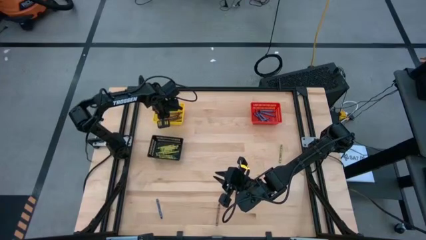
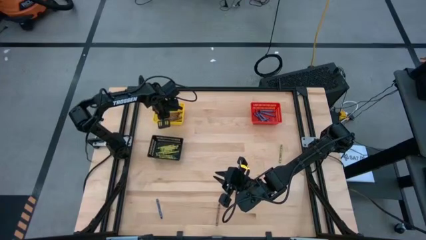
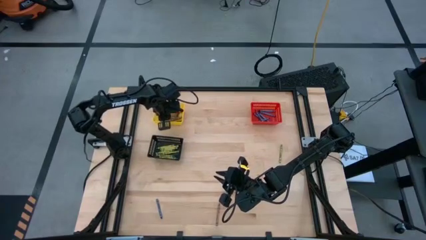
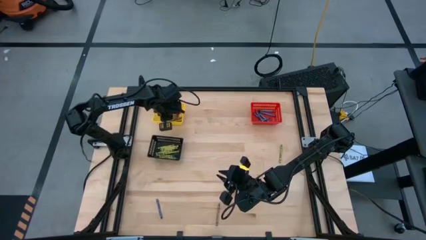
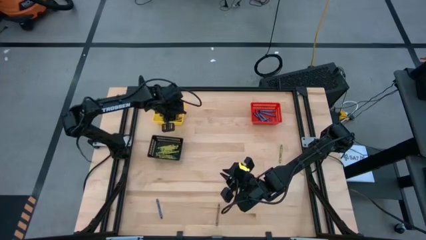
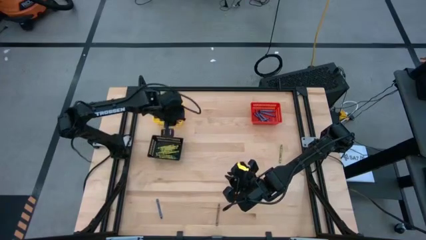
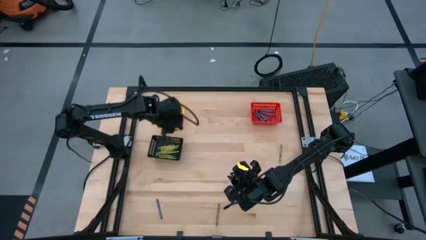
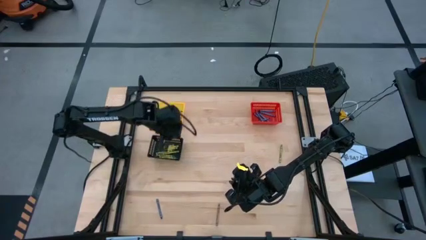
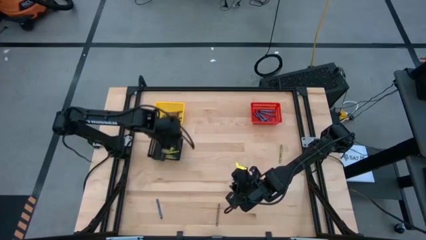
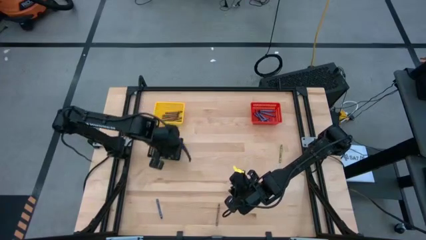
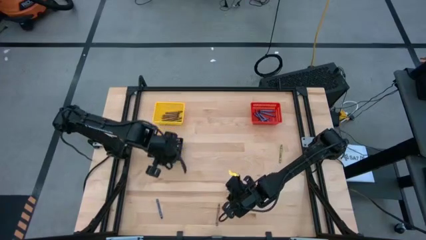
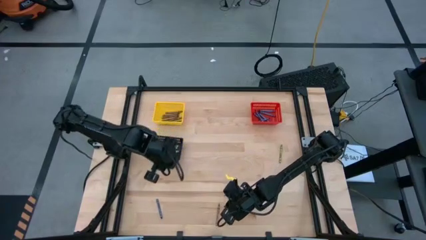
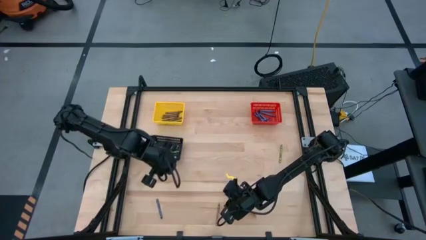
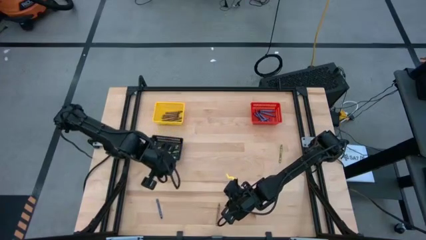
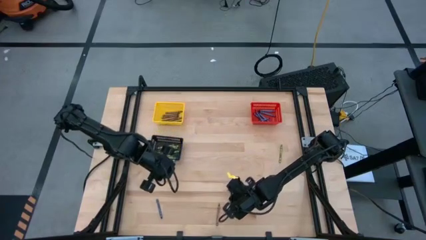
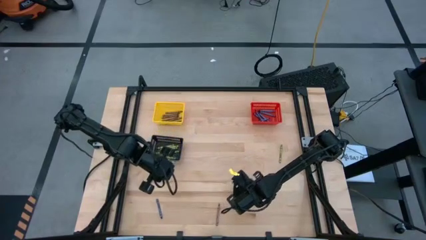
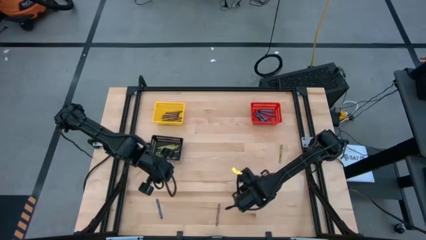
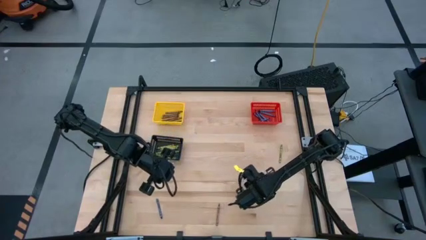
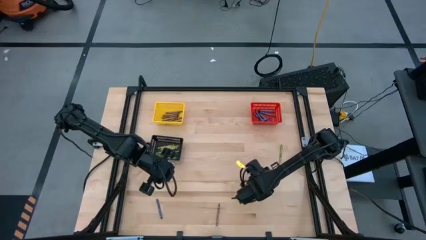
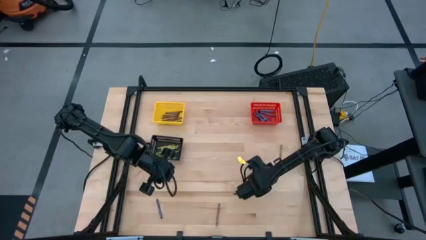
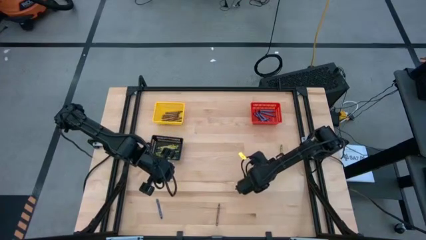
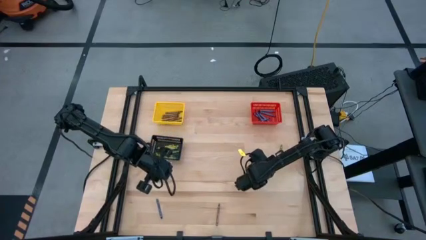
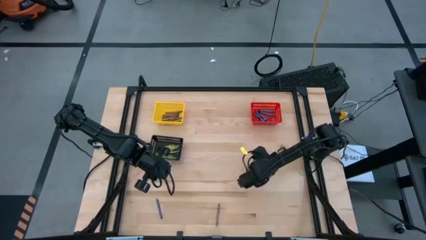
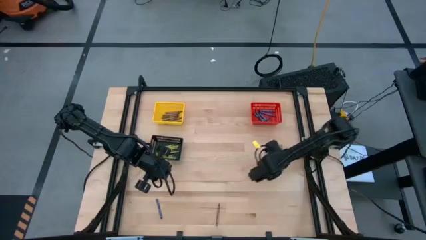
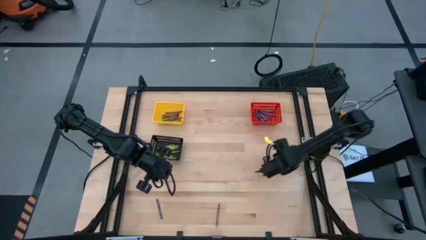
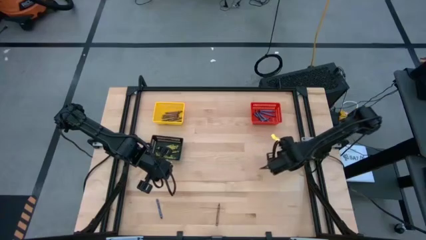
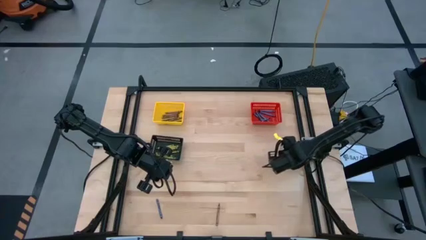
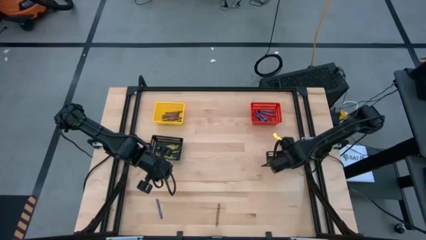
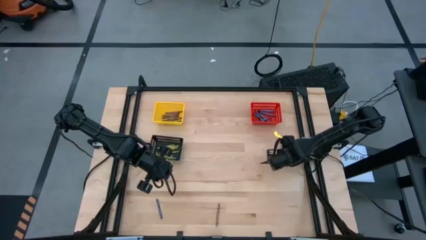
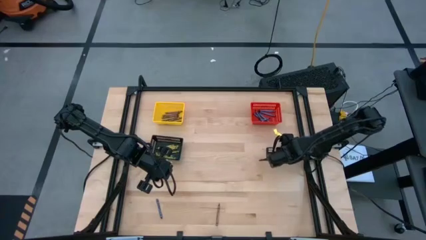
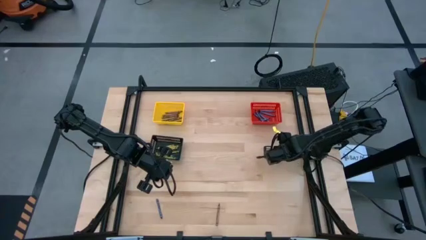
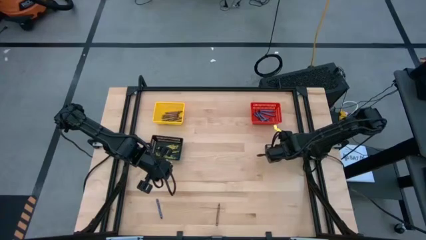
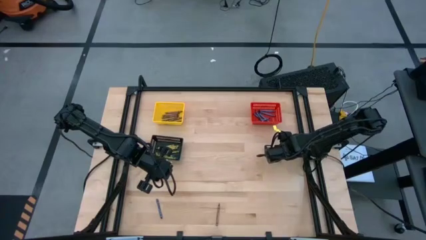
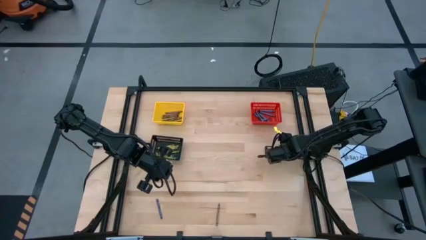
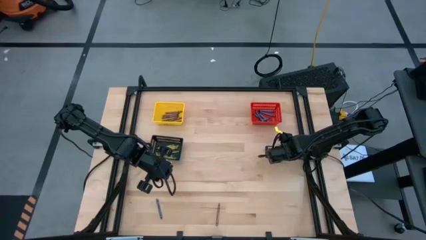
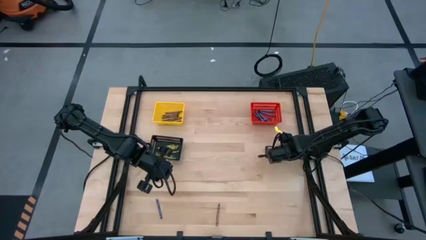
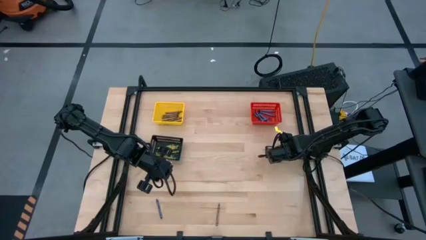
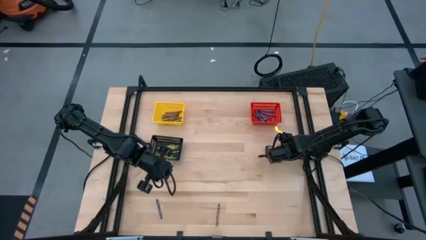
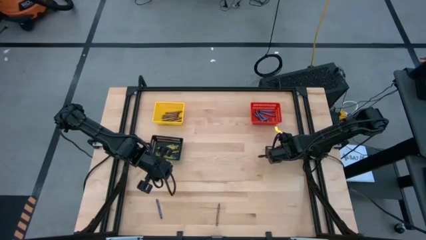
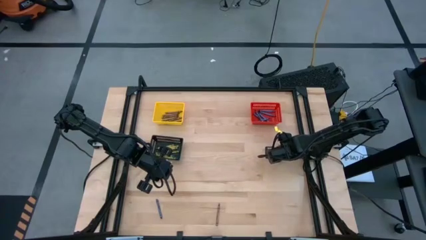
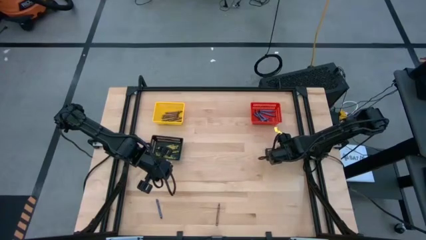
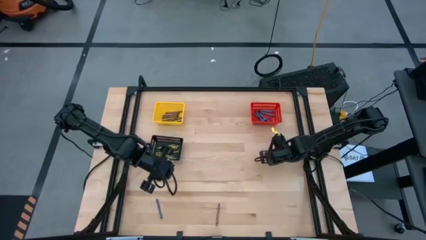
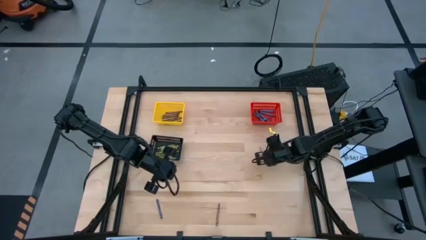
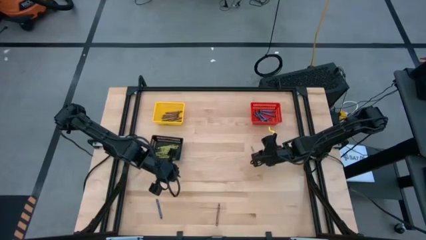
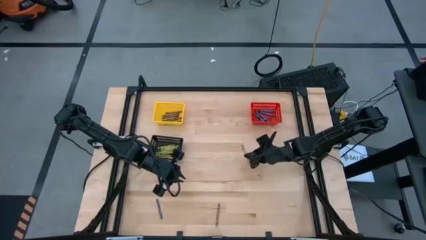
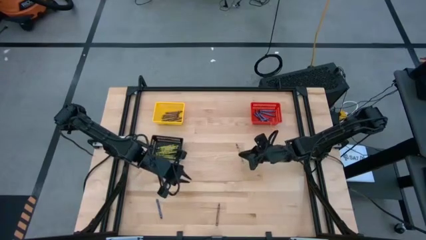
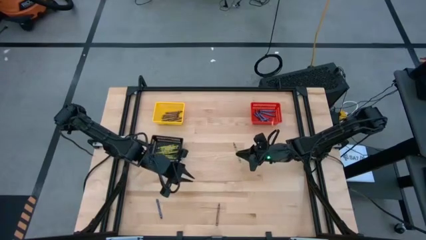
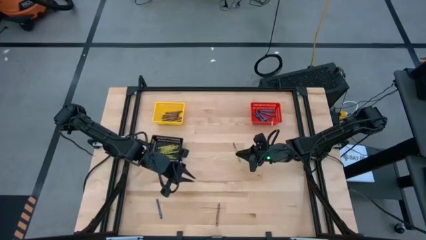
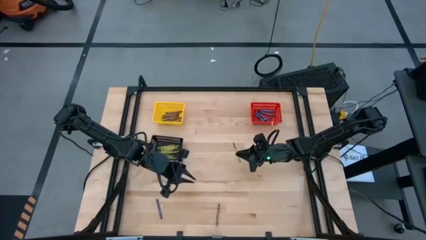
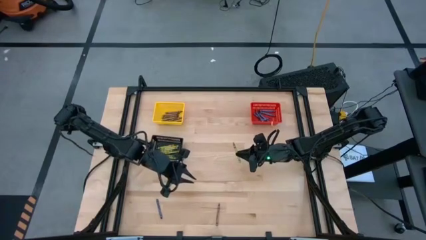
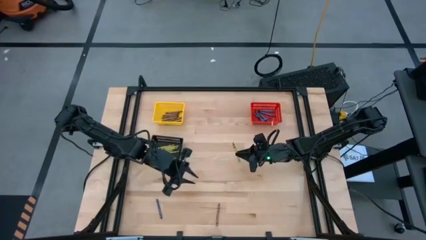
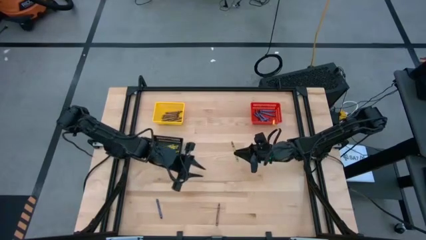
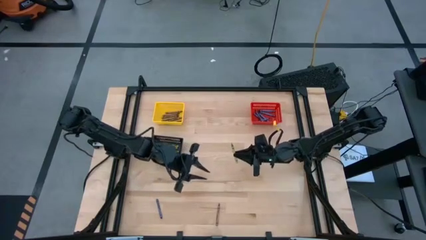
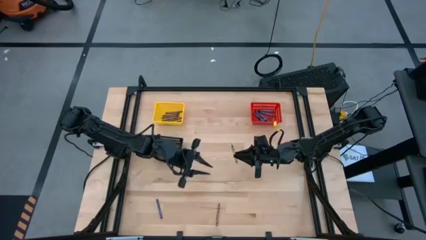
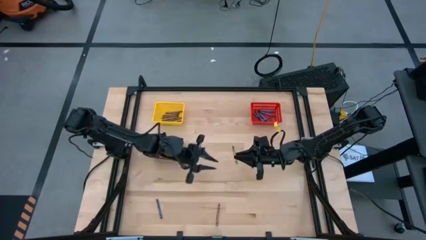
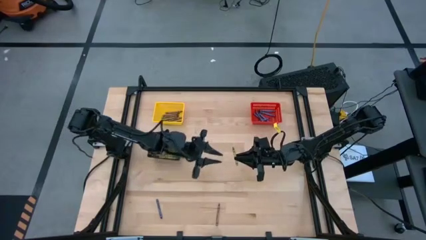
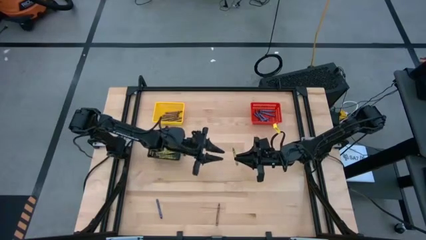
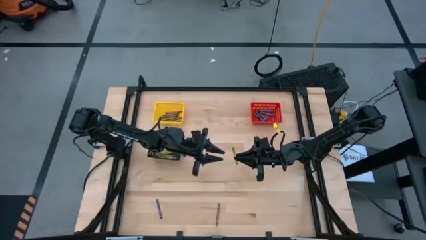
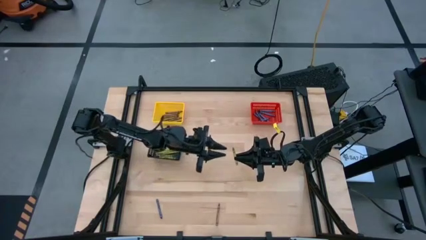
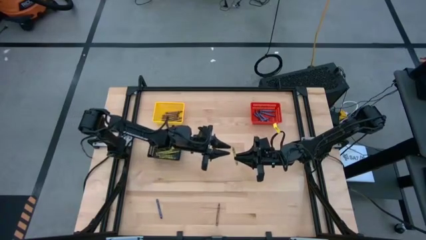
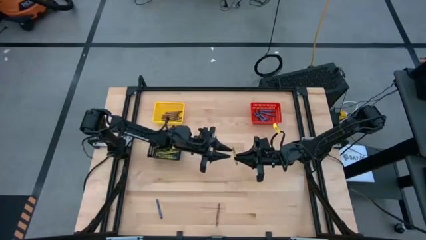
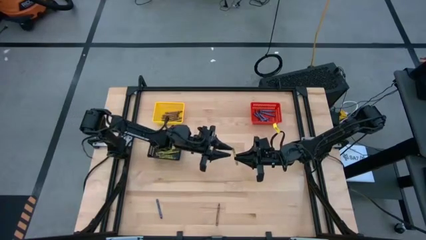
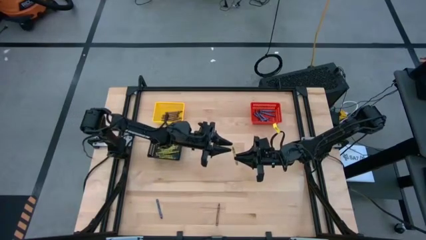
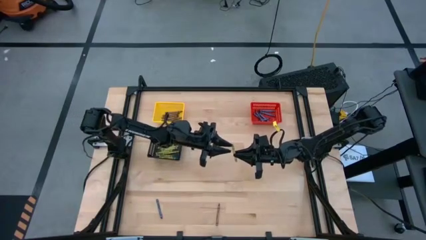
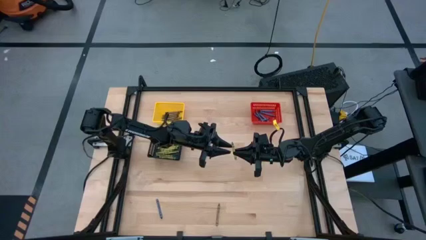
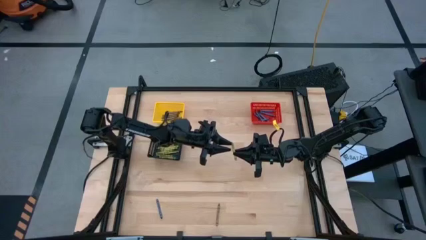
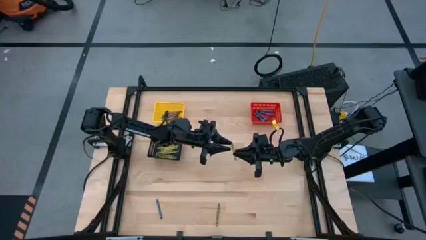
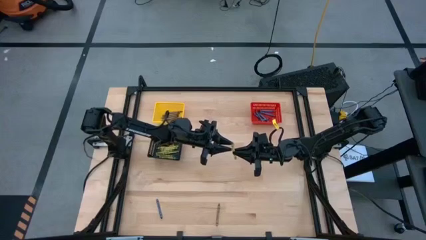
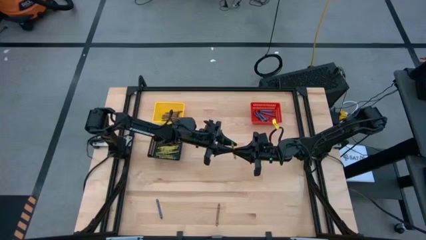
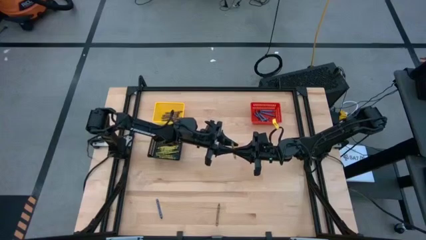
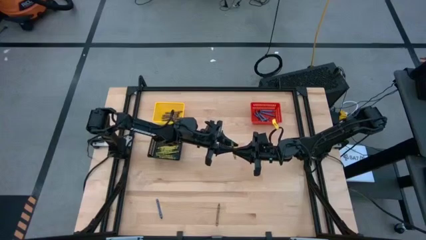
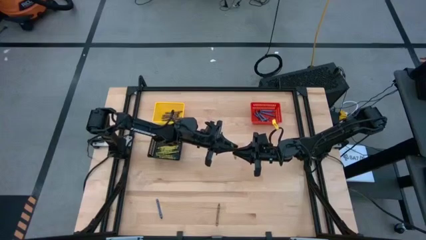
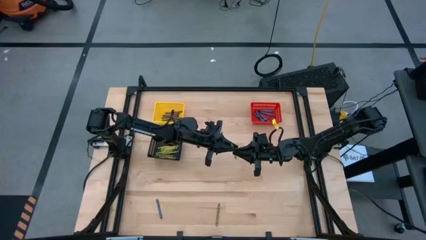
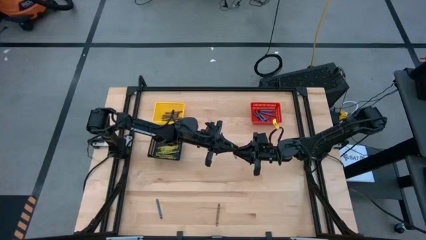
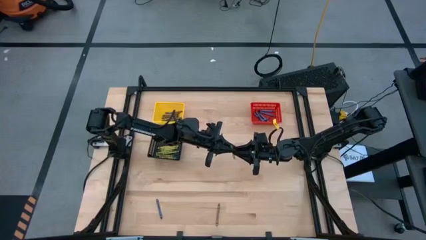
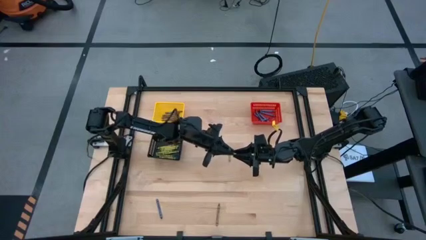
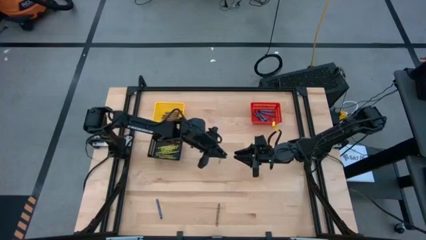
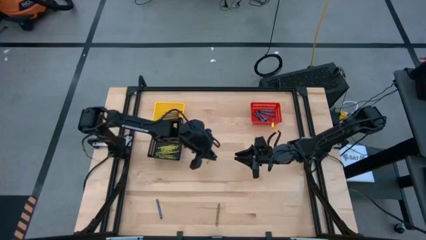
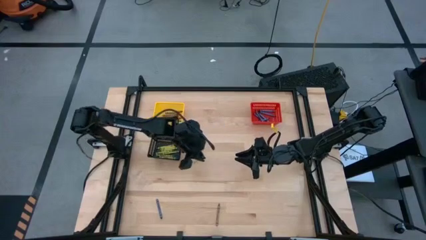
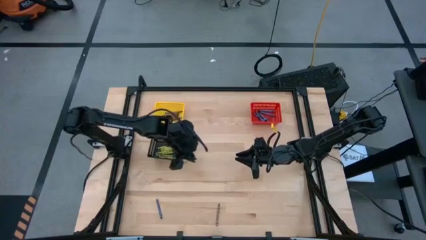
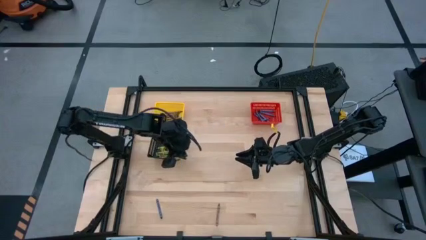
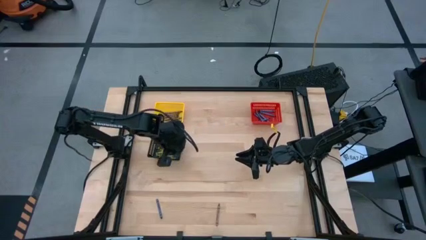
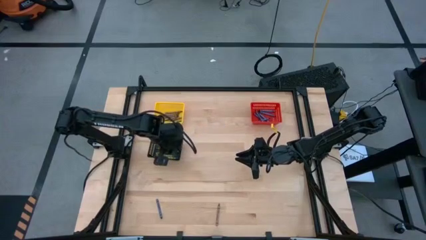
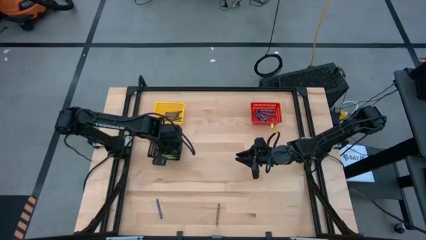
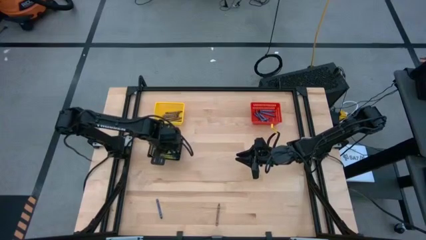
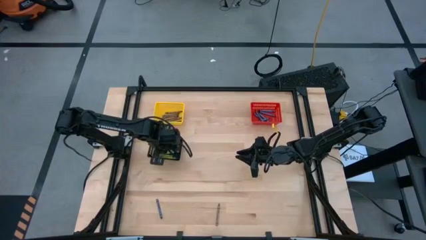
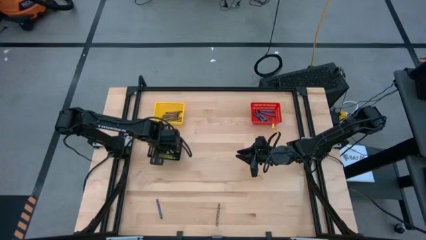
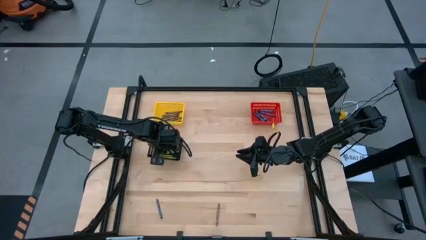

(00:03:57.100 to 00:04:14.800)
Task: Sort crayons
Put the green crayon into the black bin
